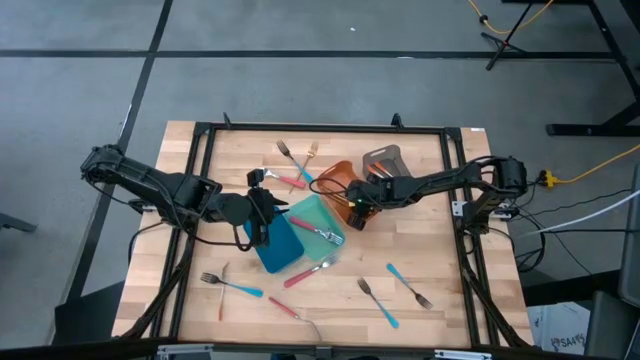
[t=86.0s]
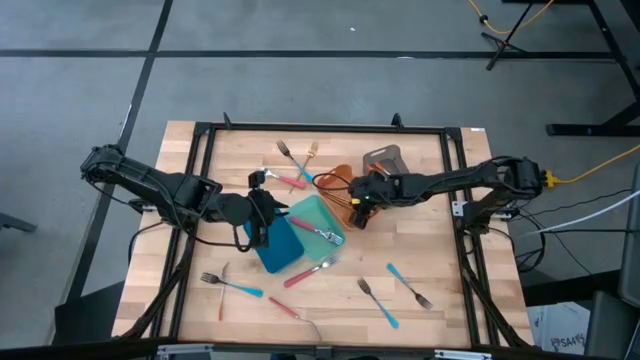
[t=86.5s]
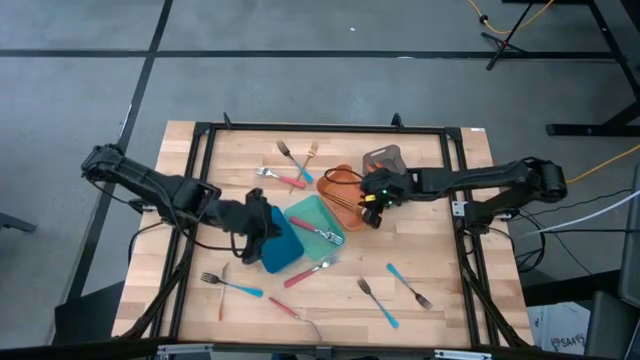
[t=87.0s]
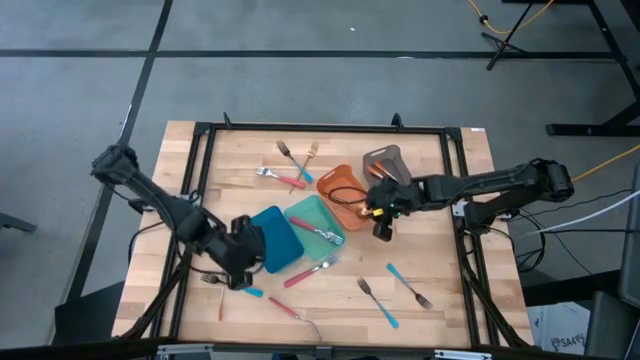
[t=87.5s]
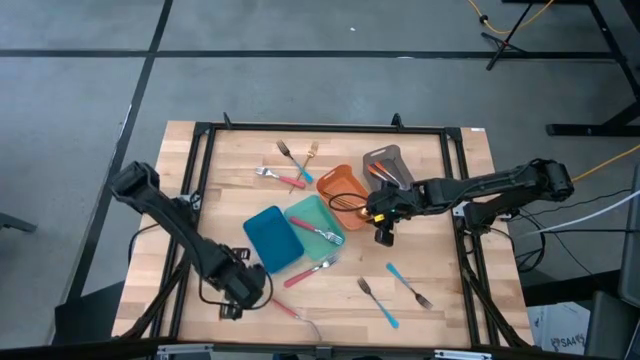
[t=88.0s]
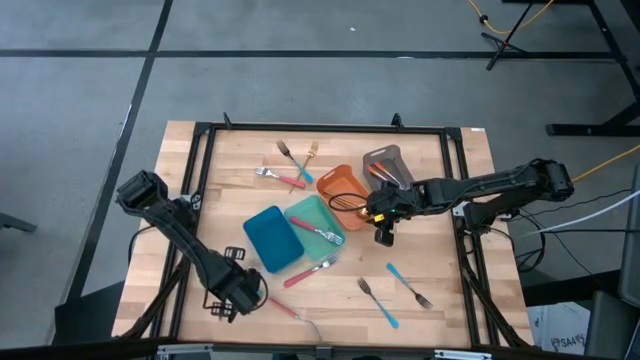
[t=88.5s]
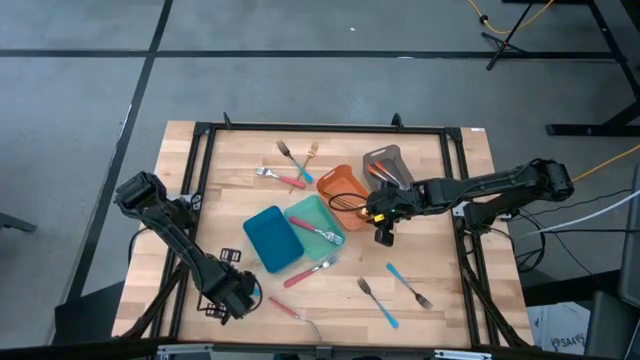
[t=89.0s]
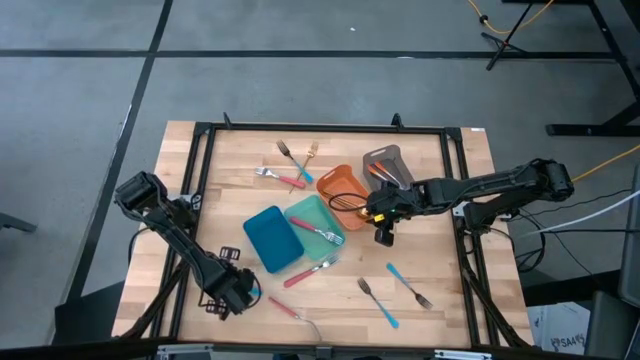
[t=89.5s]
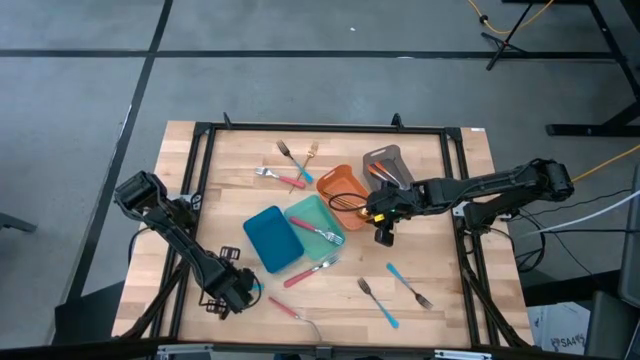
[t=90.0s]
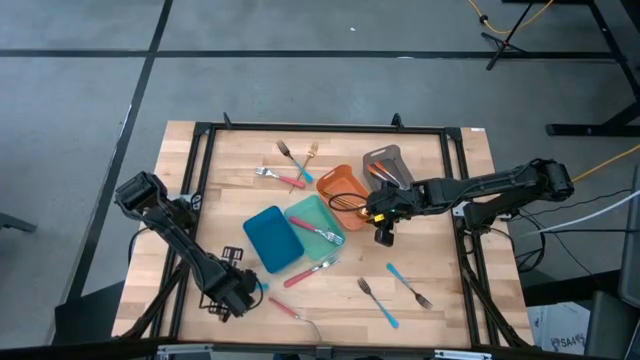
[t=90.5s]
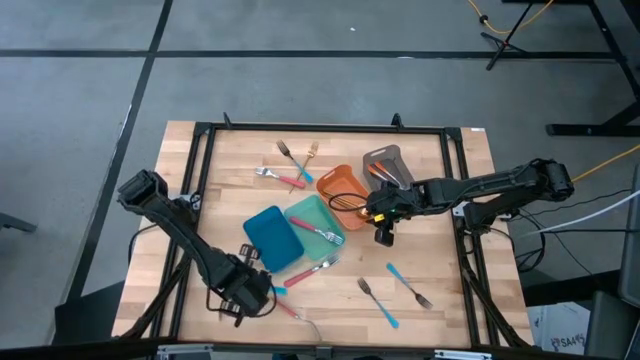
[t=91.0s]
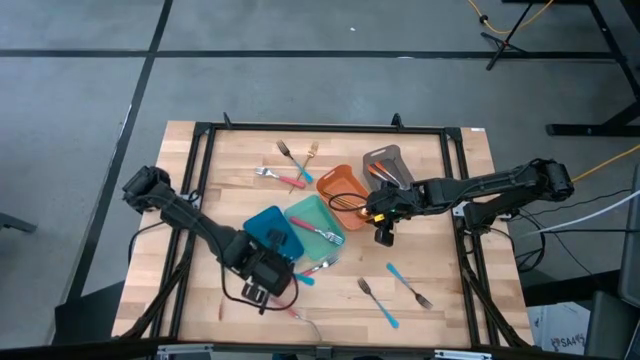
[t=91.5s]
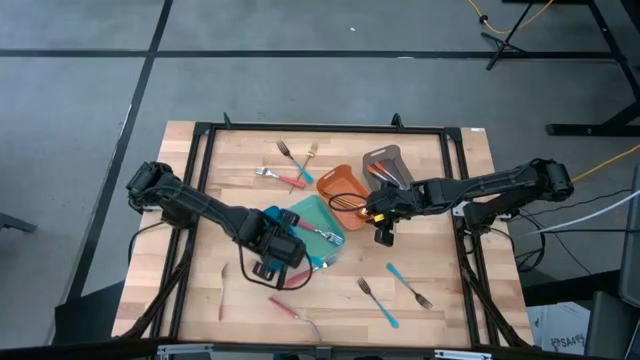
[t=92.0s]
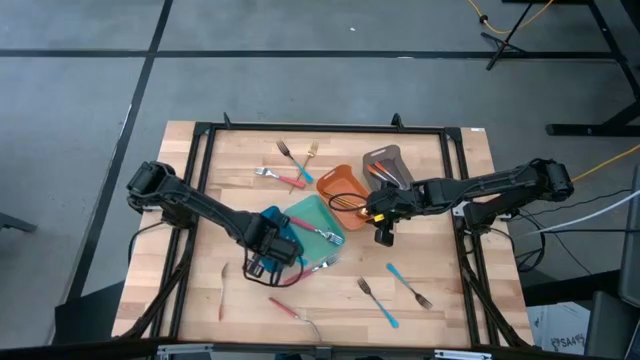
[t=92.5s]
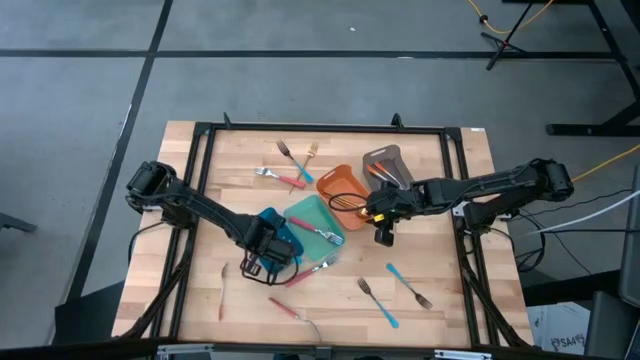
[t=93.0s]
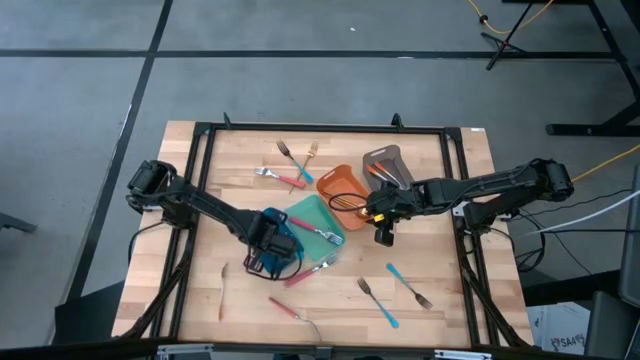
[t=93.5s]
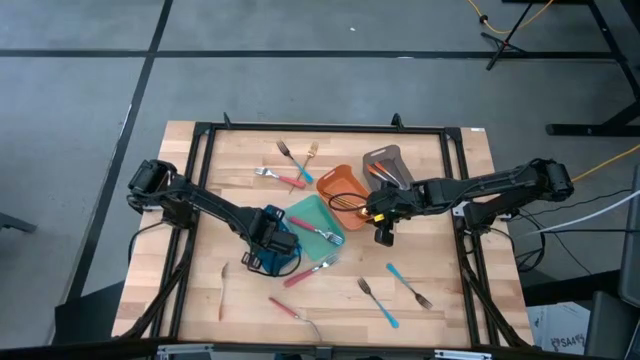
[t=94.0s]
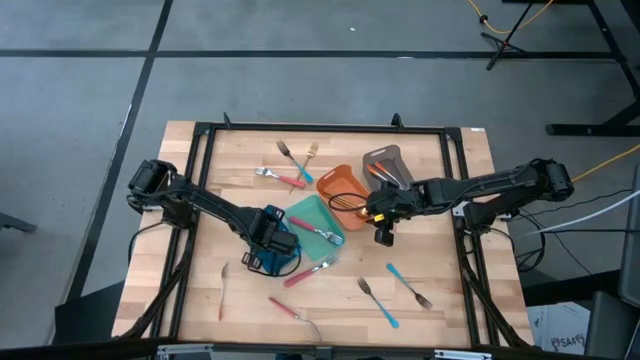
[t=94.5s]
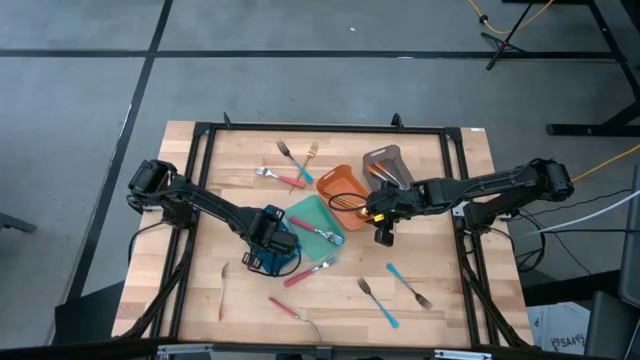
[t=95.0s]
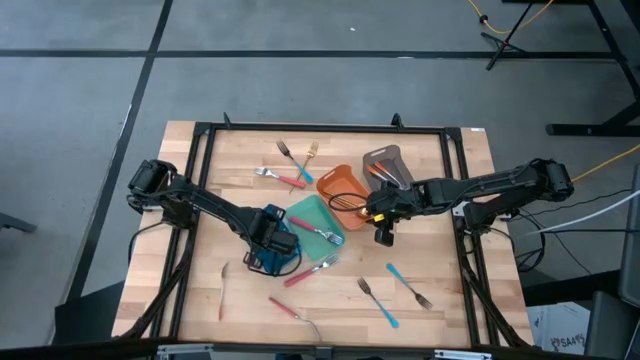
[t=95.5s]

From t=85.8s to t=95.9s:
Task: Sort silverware by color (type)
Put the blue fork into the blue bin

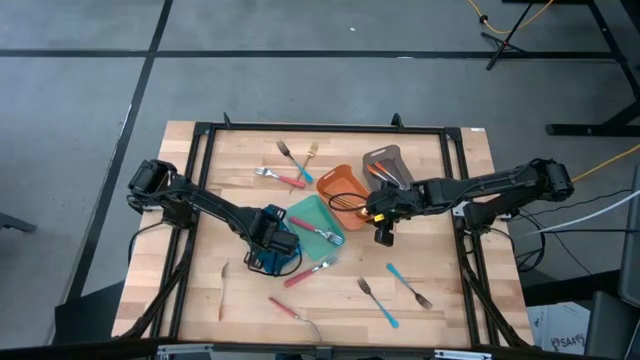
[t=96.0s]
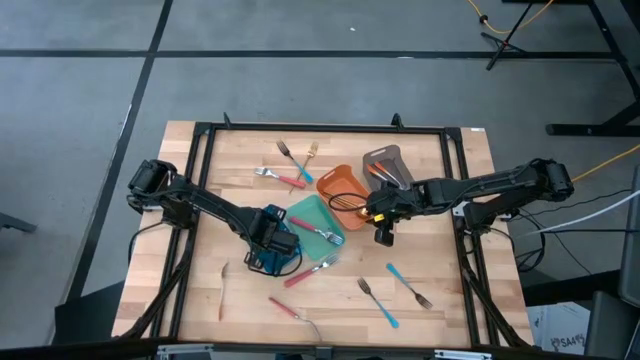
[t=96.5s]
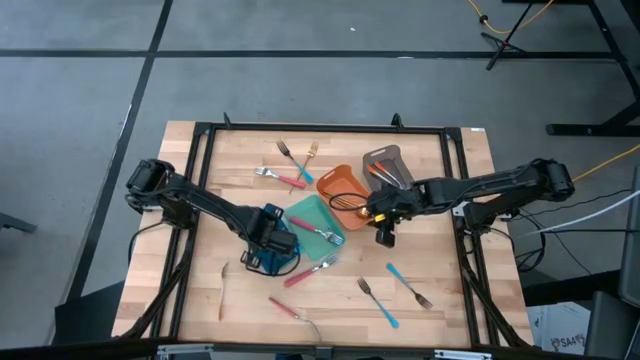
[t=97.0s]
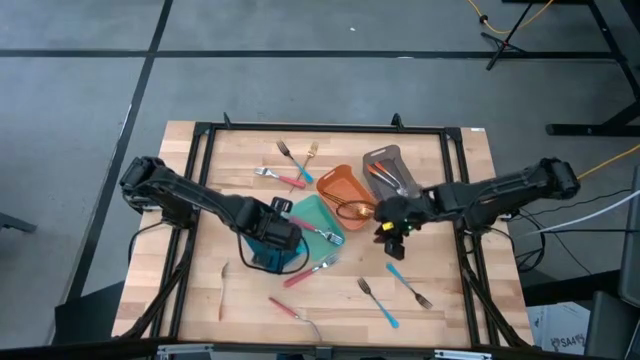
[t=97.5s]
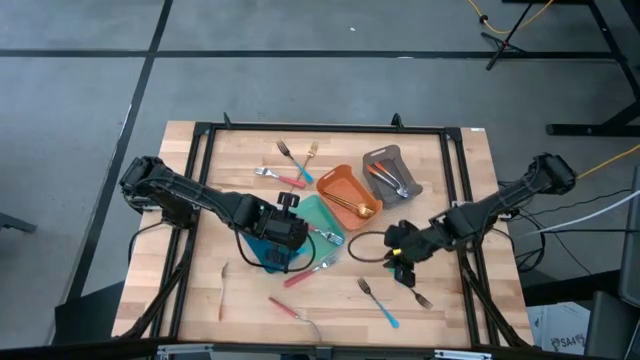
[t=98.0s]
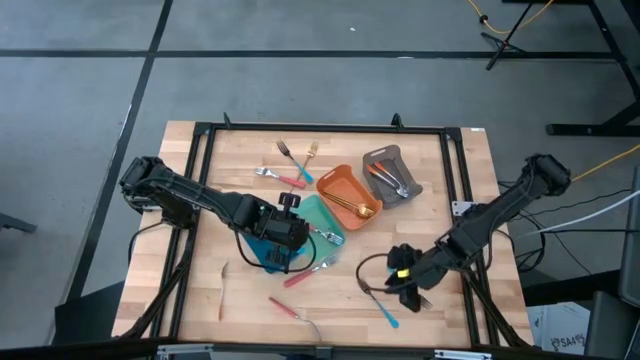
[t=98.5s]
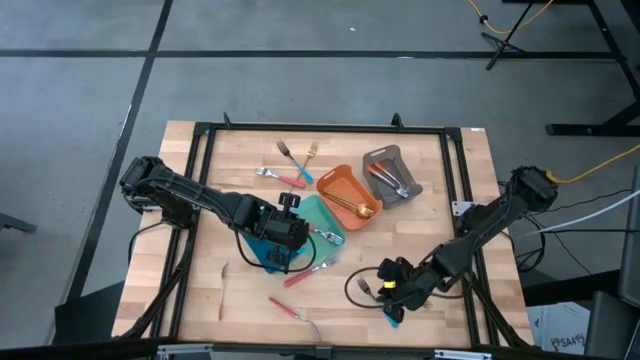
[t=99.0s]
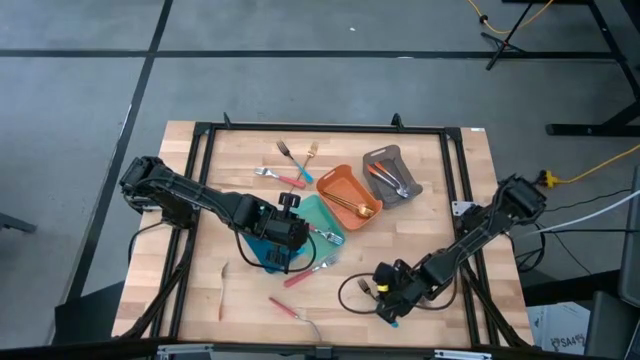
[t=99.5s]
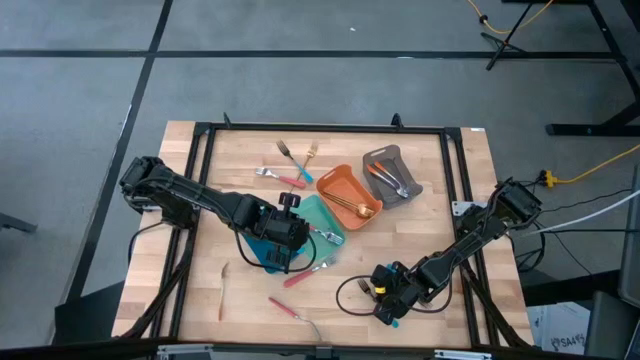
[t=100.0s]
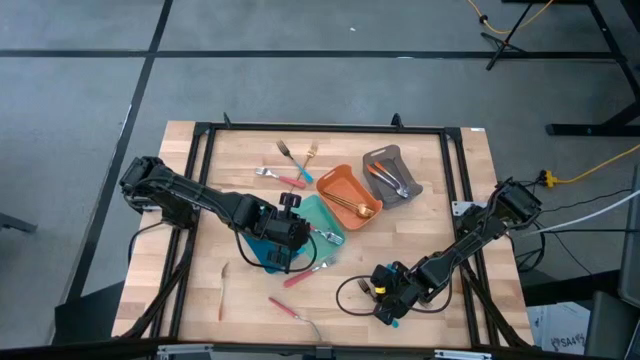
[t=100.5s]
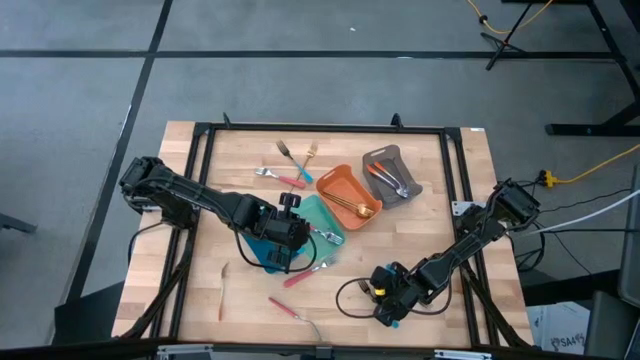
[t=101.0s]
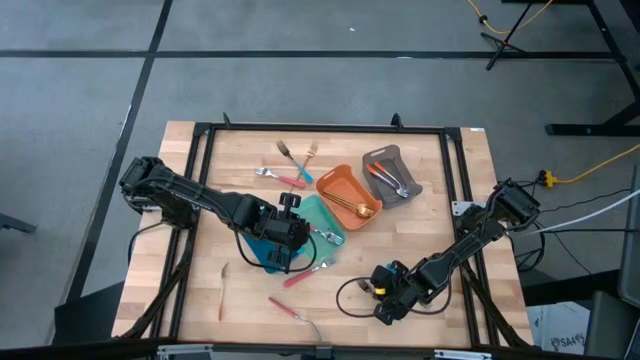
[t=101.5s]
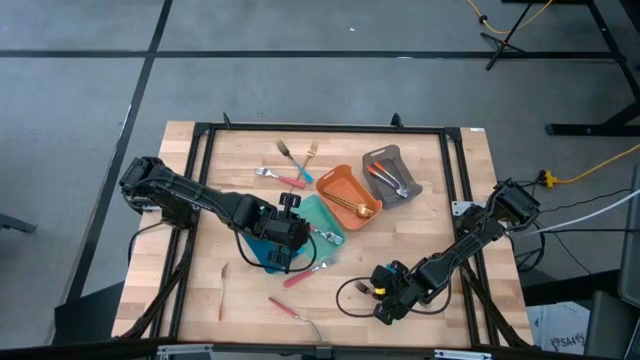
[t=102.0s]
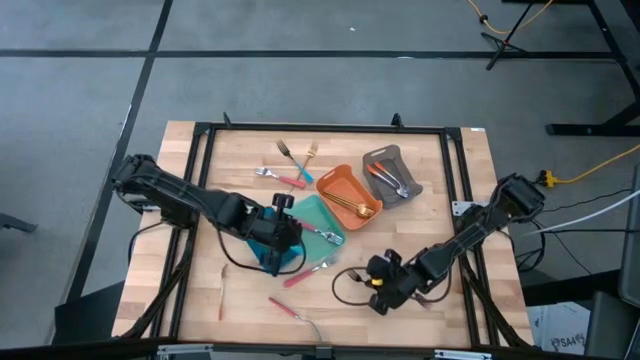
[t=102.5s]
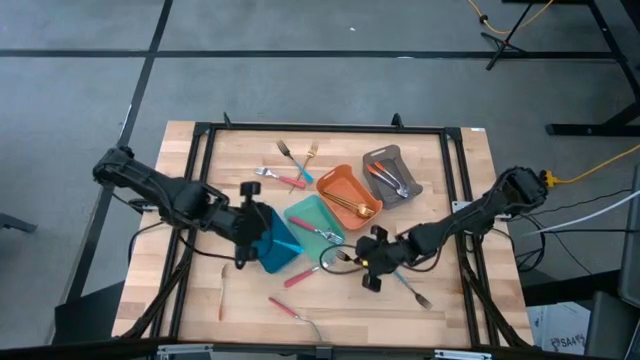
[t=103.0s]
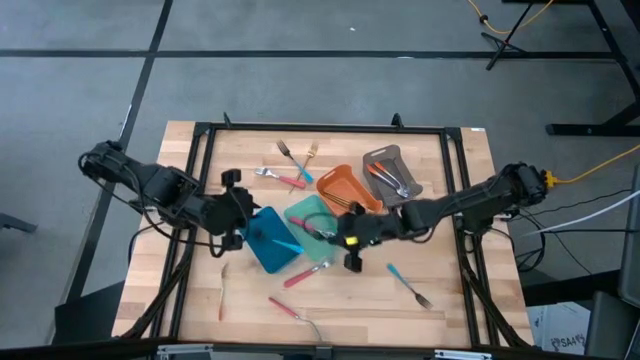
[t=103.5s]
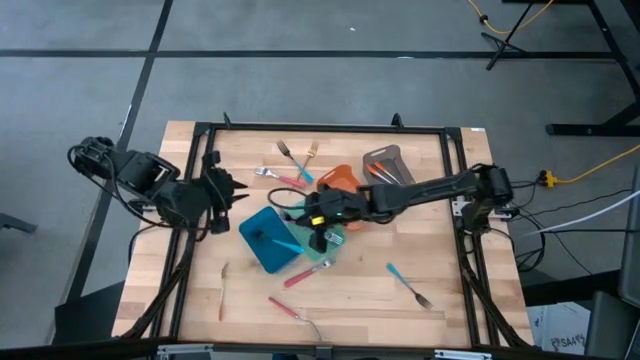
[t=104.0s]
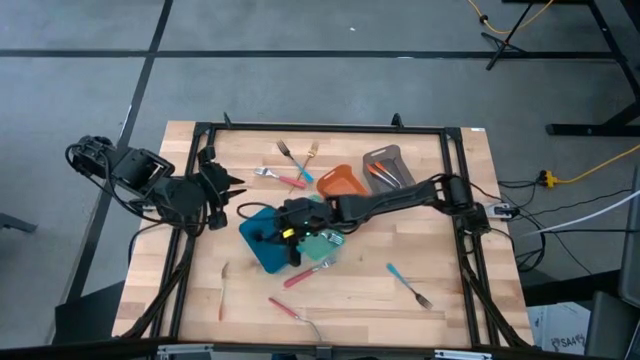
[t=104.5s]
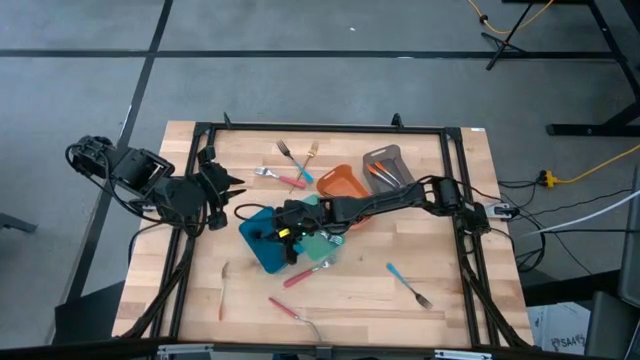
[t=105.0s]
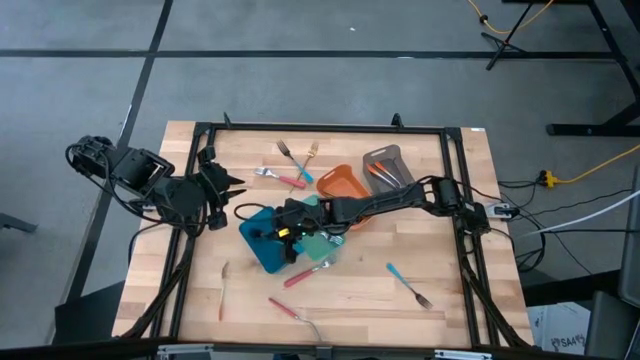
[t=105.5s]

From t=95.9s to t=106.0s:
Put the left blue fork into the blue bin
